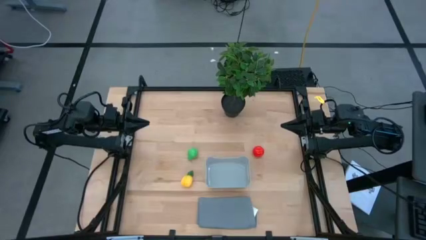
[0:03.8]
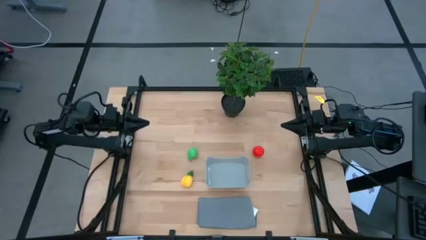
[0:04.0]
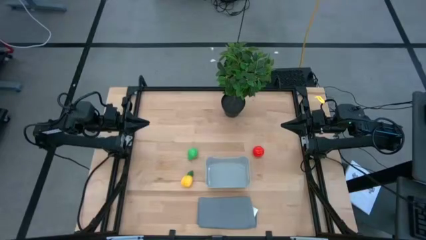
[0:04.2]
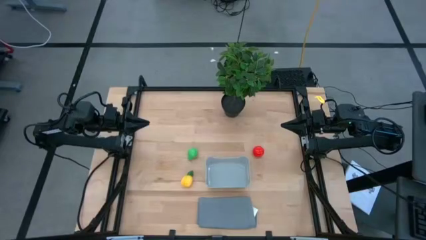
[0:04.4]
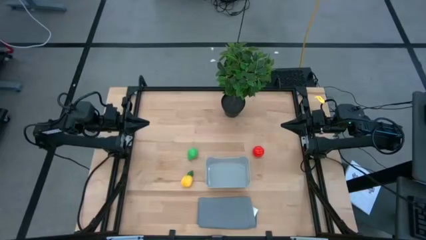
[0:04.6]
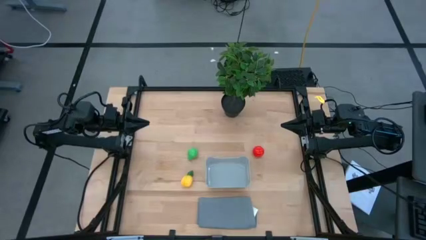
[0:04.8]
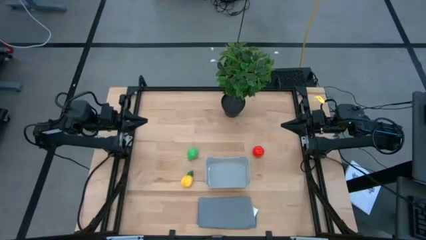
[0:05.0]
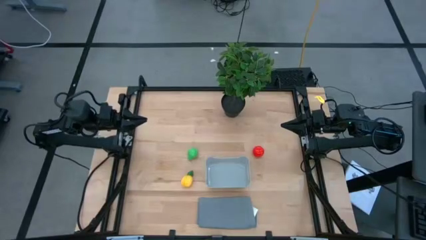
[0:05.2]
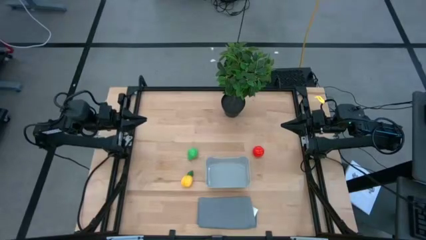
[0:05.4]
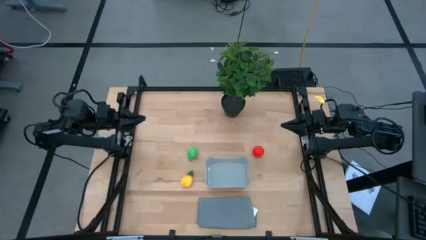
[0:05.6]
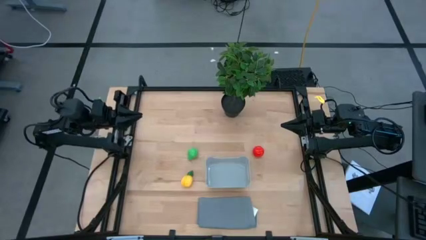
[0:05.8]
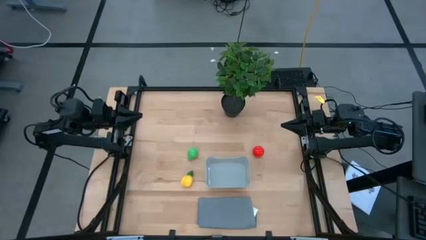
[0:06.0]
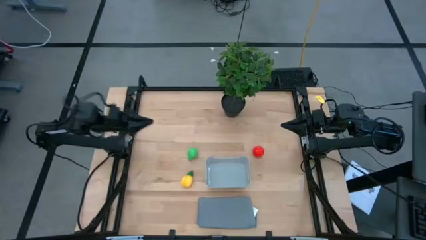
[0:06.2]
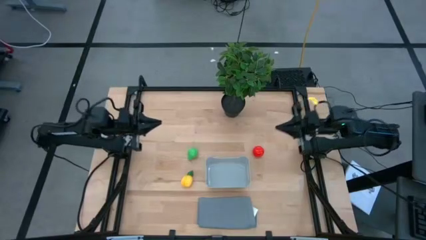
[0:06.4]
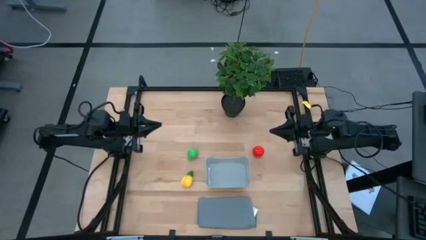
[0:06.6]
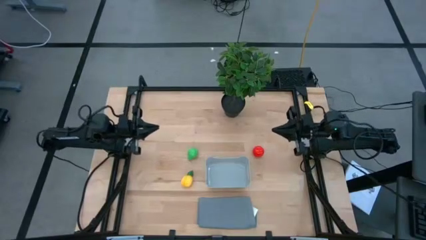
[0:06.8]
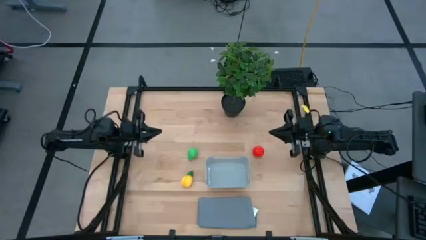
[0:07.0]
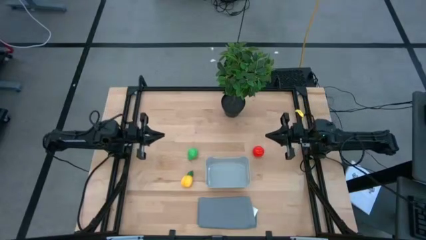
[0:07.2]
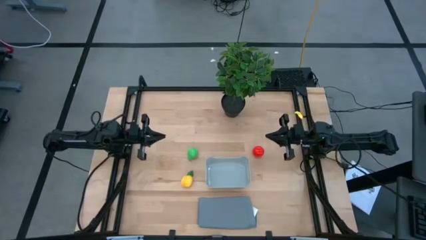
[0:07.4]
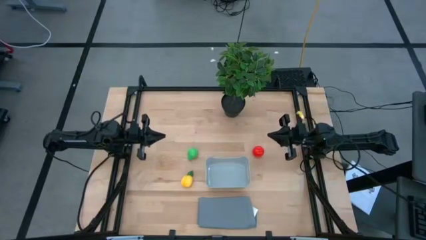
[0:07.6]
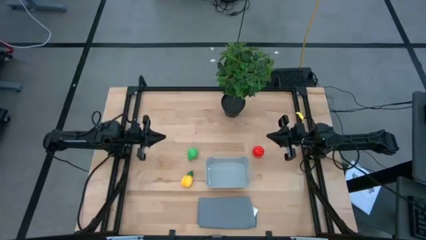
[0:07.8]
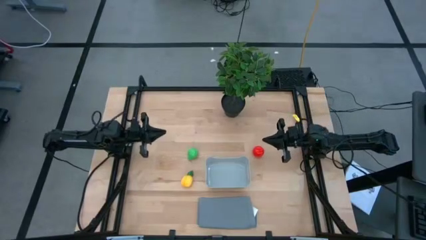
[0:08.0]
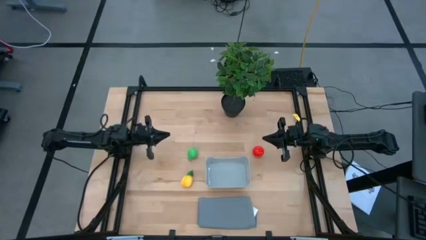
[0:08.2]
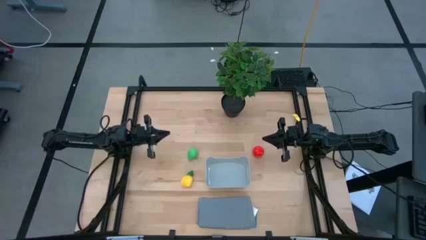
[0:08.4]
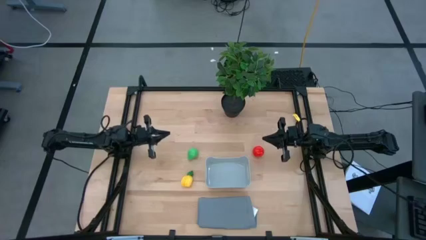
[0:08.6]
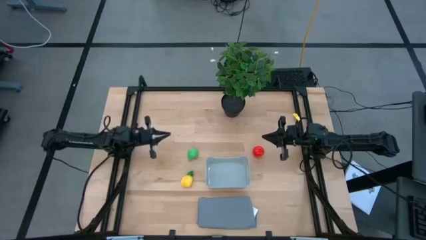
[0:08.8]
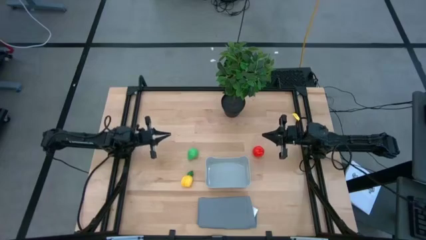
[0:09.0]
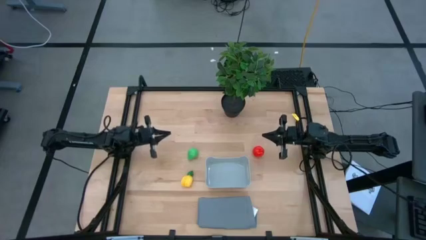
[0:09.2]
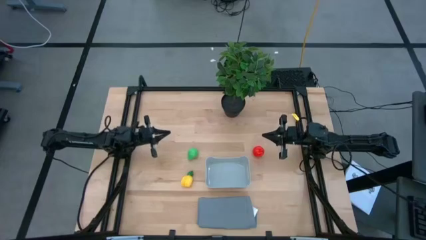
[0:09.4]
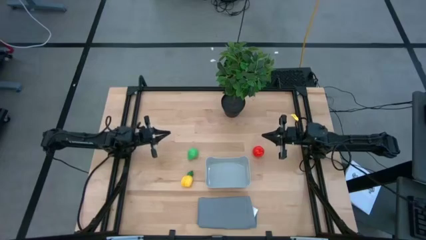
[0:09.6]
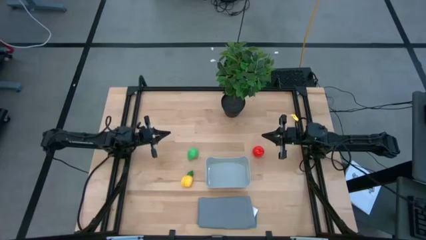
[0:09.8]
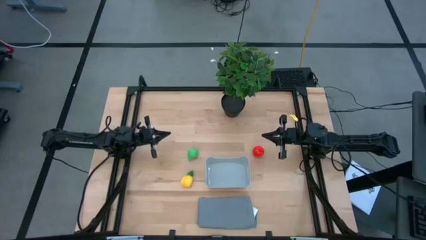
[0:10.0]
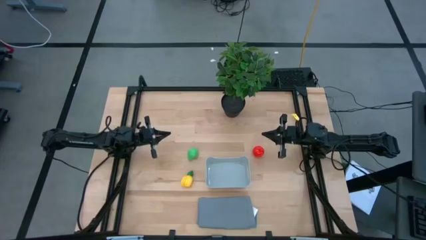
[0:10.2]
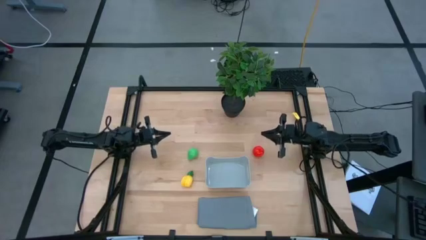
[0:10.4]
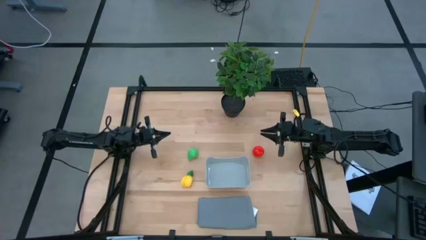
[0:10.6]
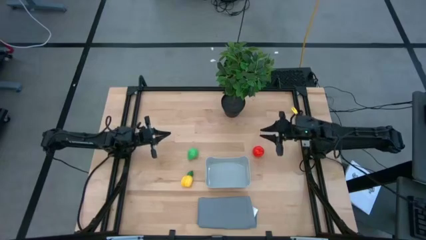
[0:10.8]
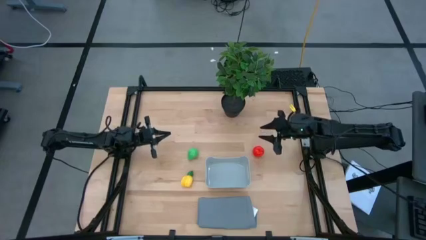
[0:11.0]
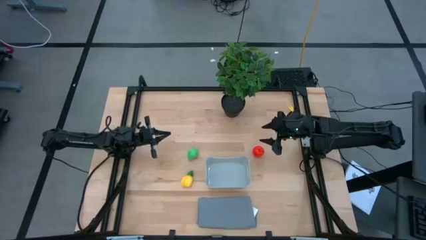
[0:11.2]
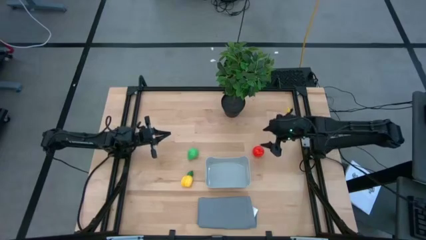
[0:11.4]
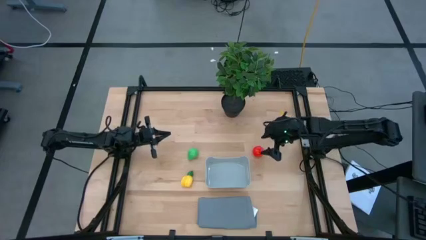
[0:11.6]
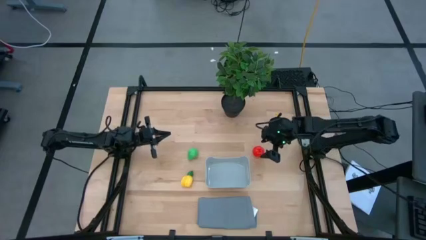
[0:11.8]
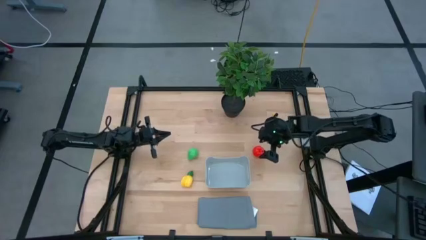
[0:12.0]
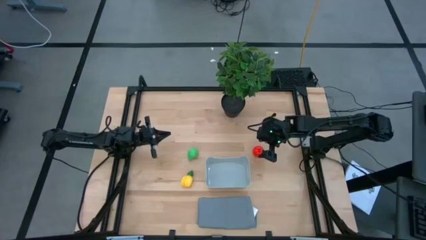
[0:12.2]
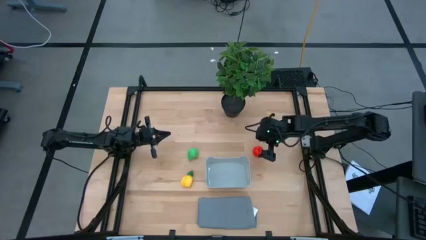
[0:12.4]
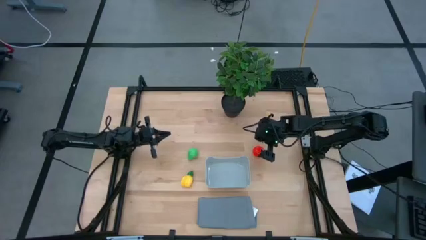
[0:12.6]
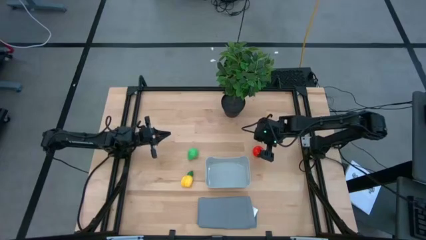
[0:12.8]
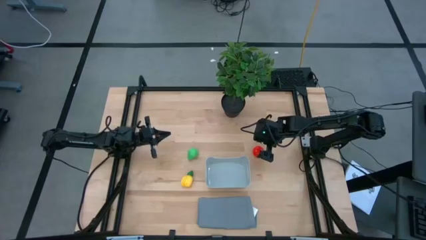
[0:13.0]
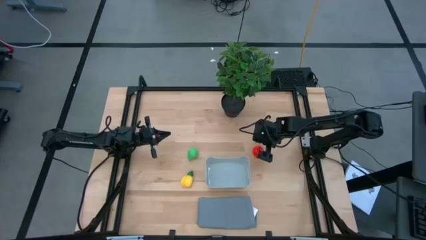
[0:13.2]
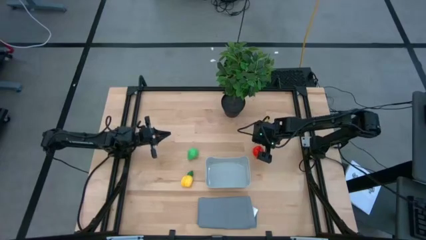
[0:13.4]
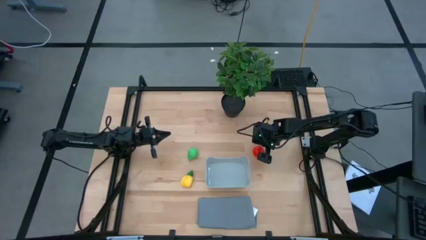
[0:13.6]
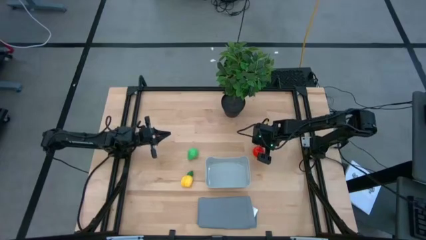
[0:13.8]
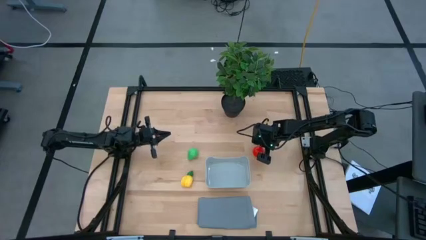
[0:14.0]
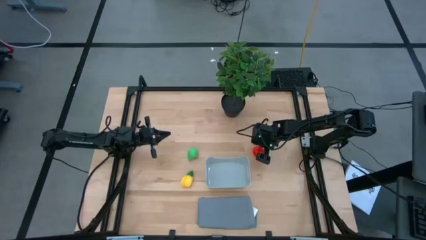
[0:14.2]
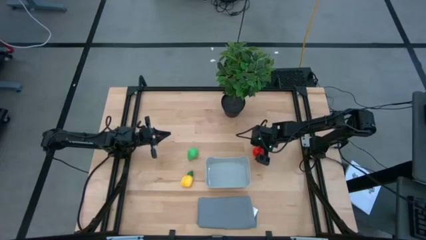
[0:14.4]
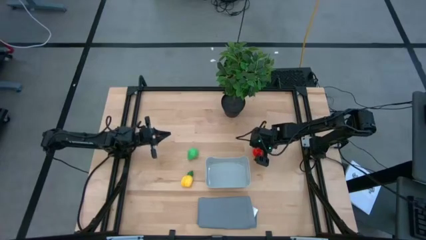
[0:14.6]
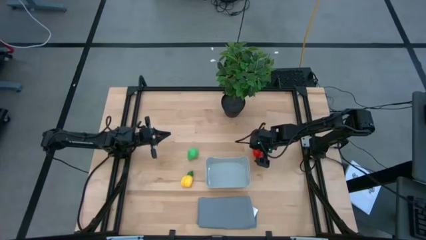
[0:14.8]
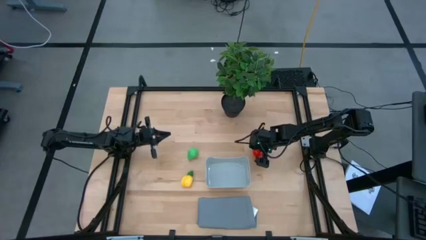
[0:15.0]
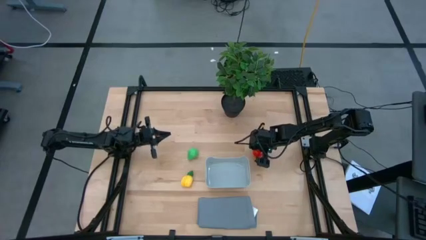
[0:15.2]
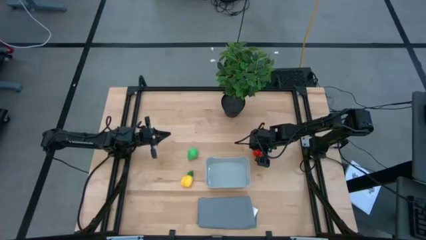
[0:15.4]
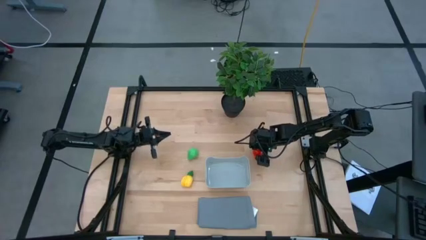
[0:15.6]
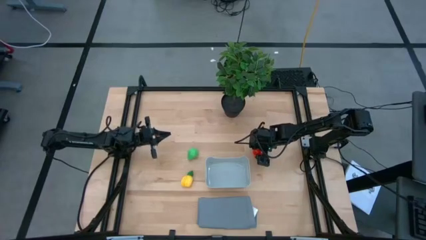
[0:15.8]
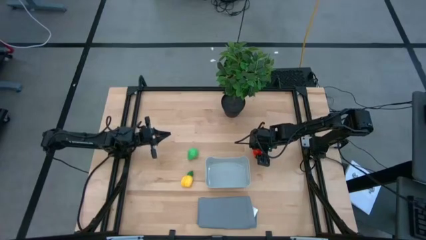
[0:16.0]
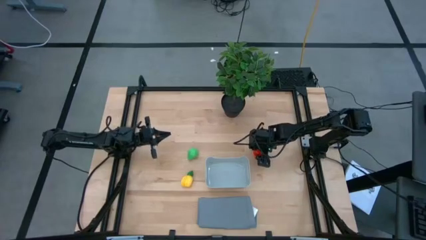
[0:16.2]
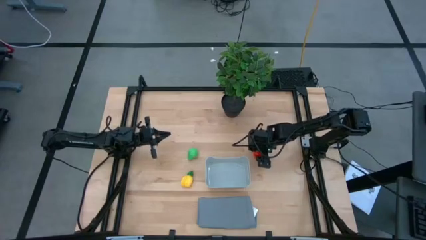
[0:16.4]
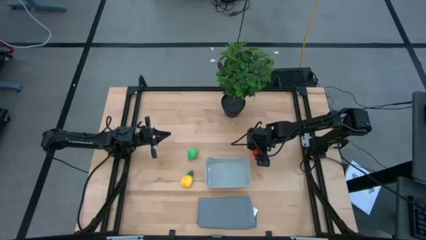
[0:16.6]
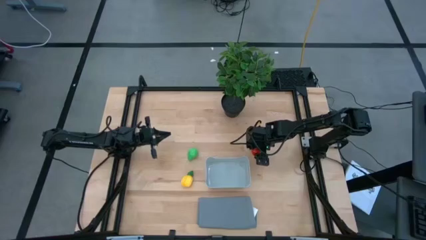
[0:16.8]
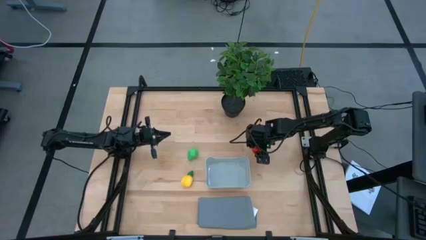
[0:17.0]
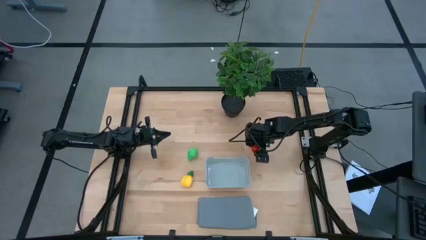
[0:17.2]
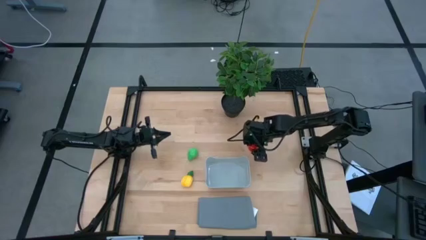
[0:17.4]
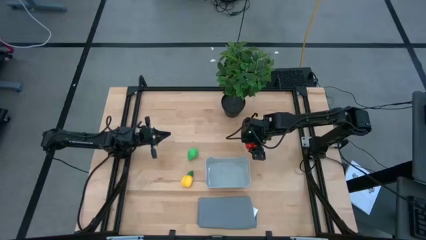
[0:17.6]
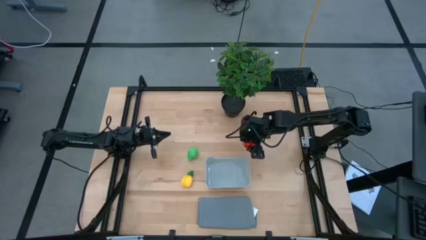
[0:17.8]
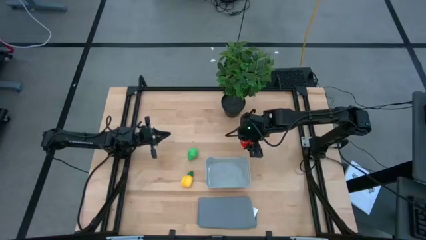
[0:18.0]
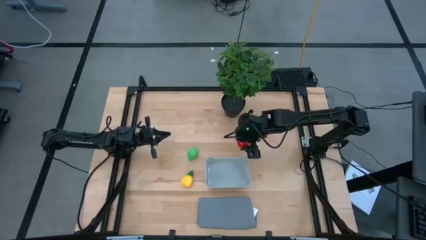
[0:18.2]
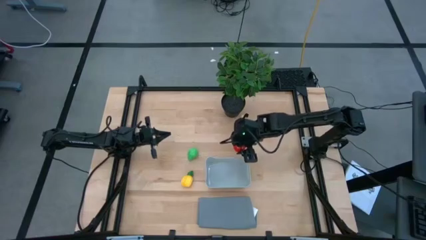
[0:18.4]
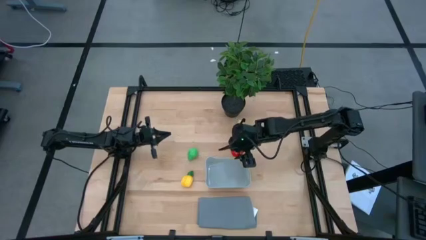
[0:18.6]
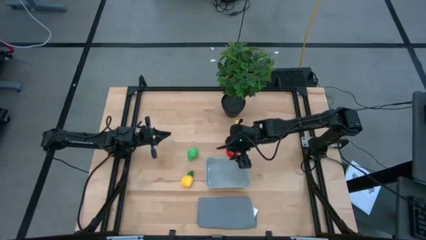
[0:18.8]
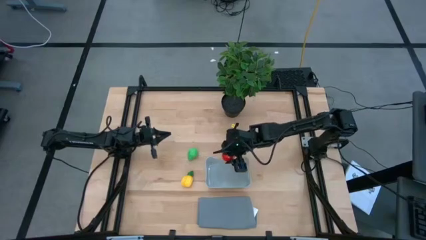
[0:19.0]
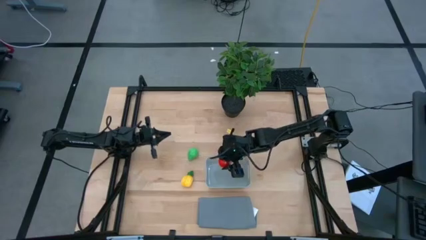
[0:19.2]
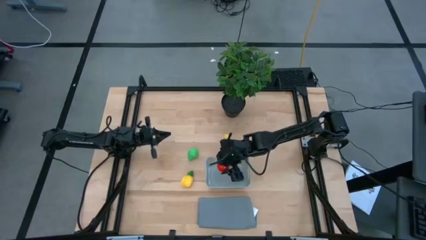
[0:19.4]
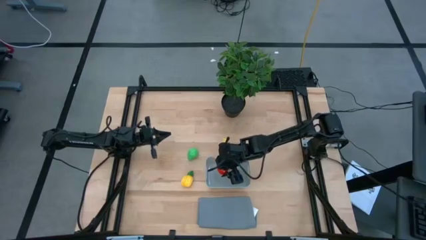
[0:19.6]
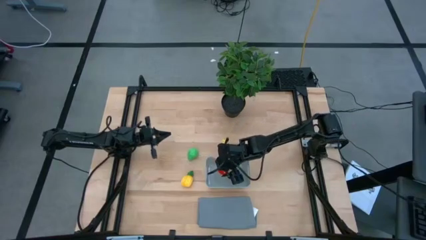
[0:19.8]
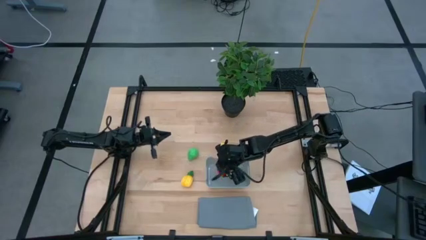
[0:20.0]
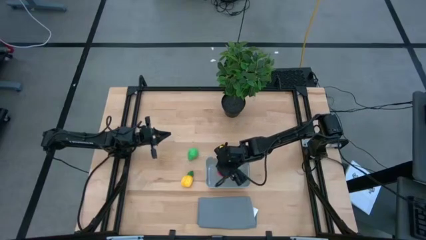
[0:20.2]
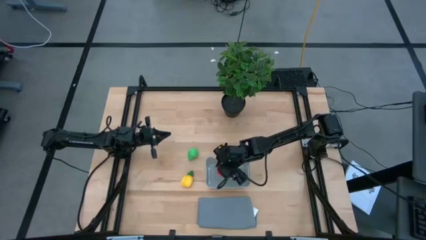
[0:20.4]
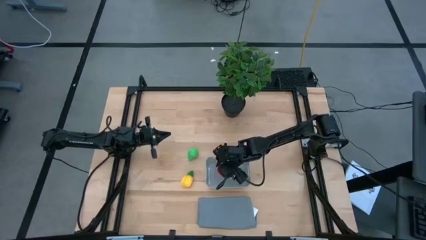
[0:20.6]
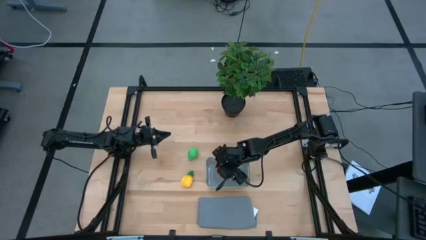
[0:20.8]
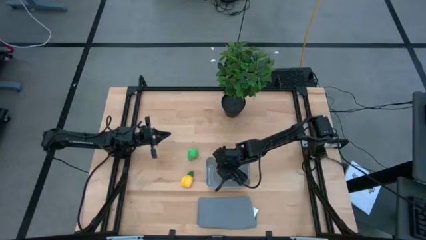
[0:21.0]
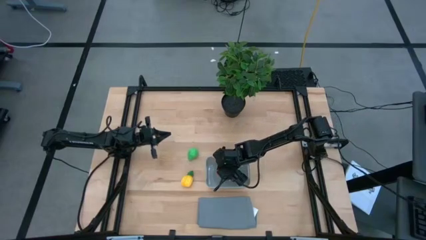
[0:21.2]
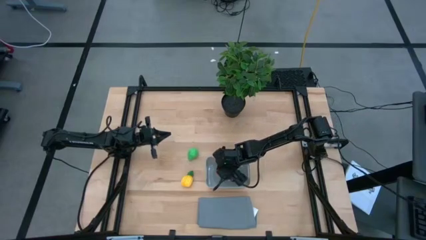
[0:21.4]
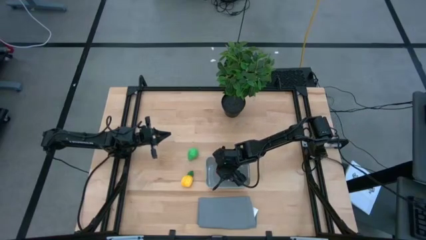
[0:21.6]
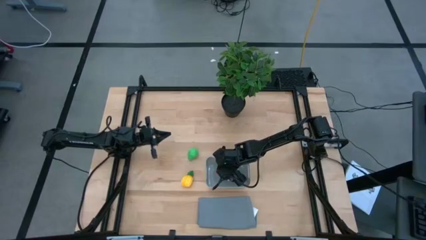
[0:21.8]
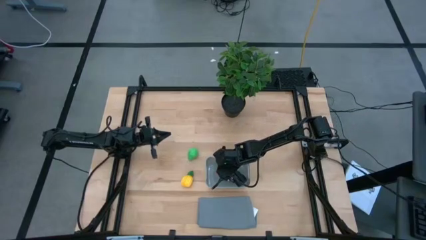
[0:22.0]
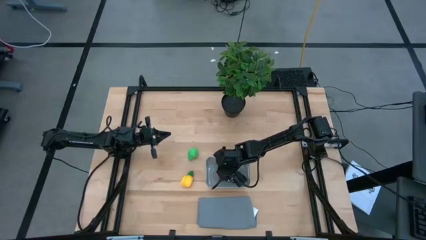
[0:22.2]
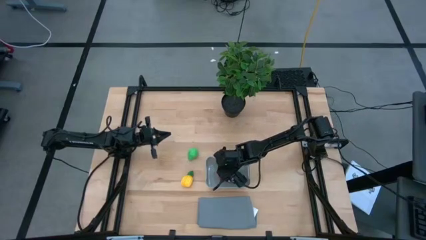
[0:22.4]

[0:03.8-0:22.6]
Task: Pick and placing Produce into tupperware
Put the tomato into the gray bin
